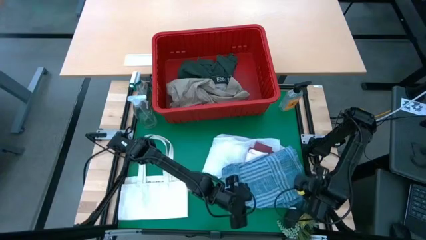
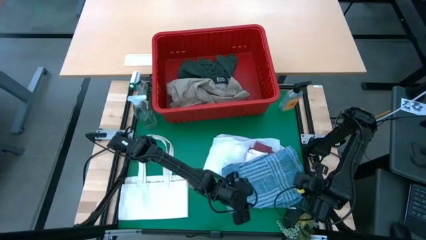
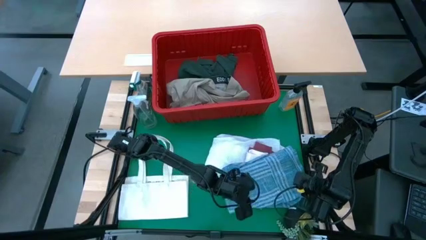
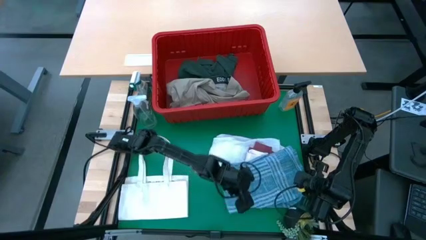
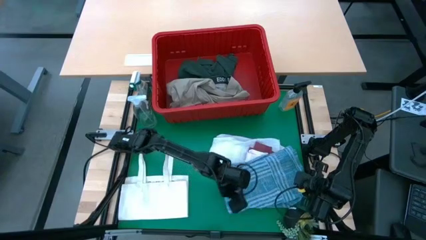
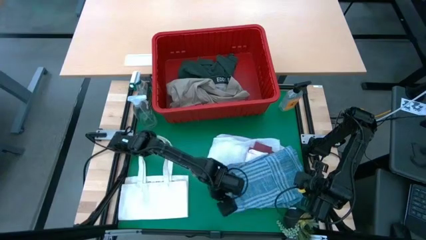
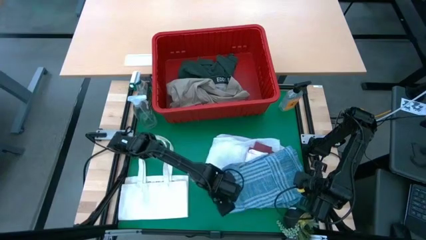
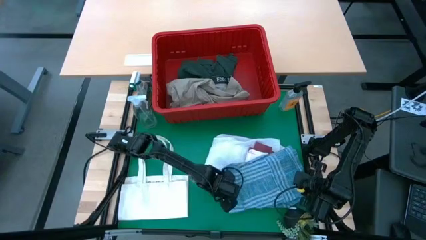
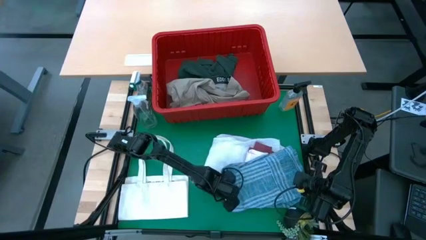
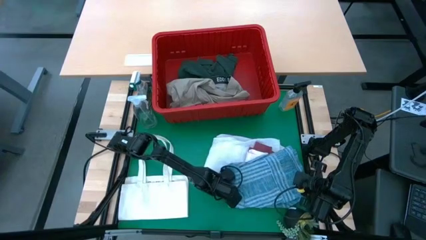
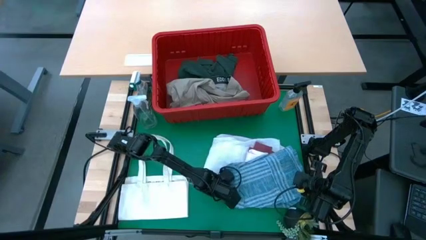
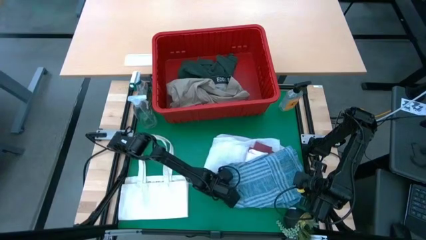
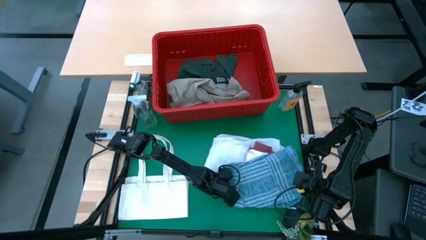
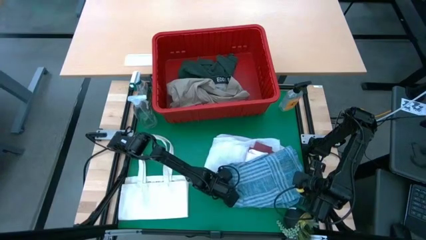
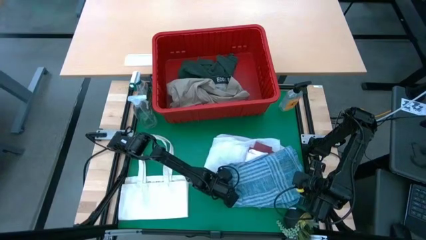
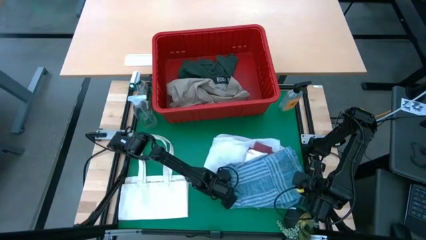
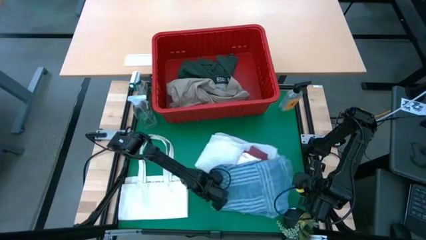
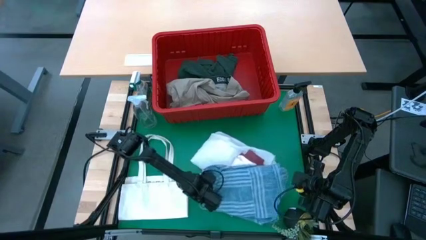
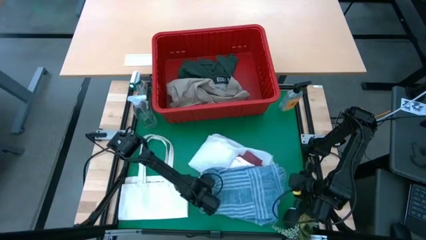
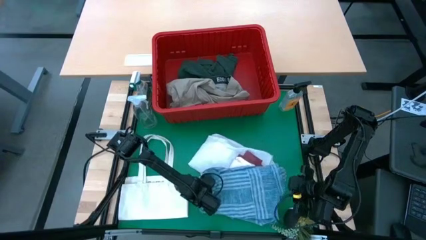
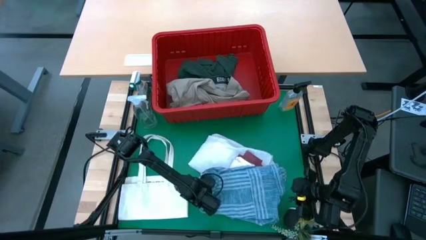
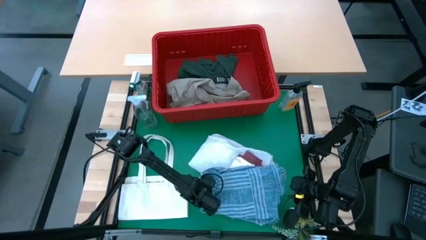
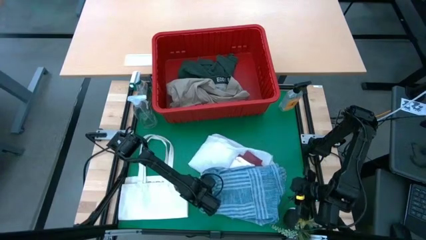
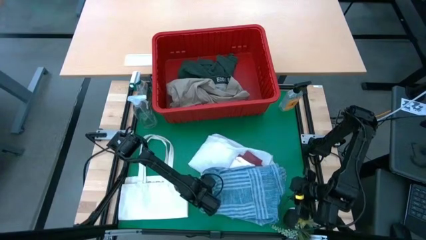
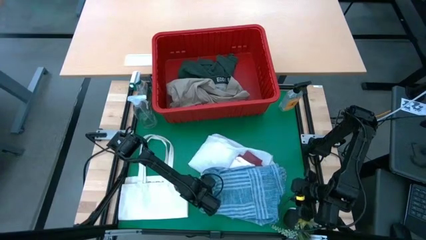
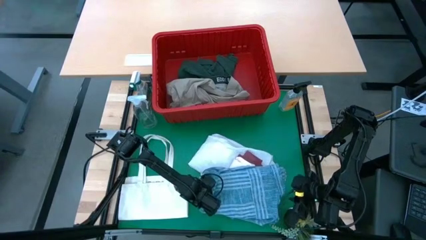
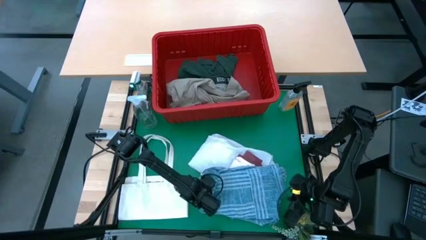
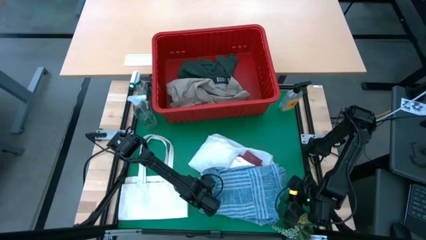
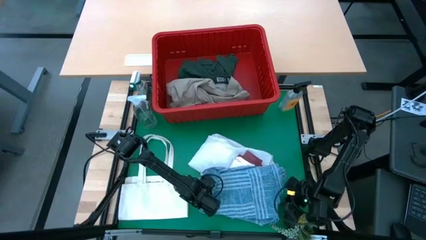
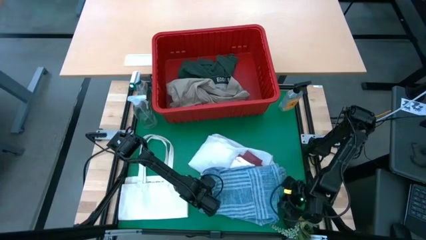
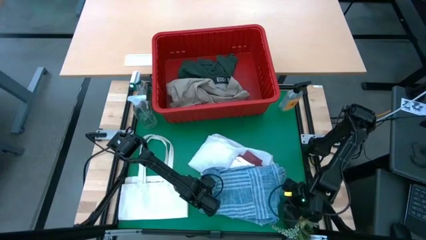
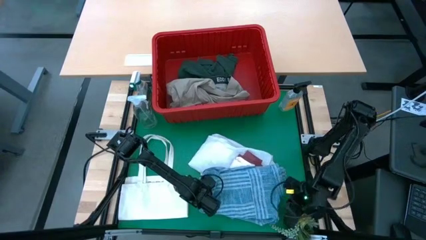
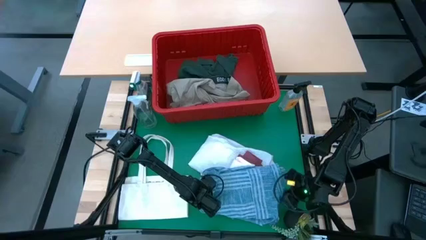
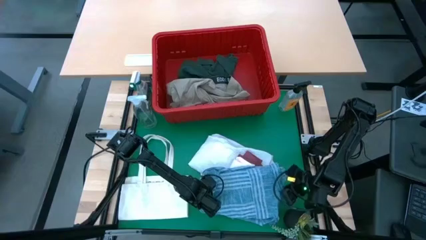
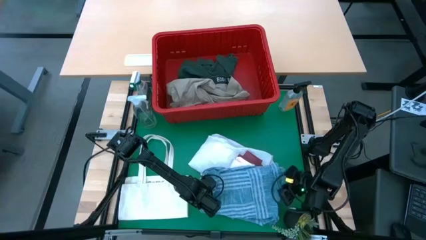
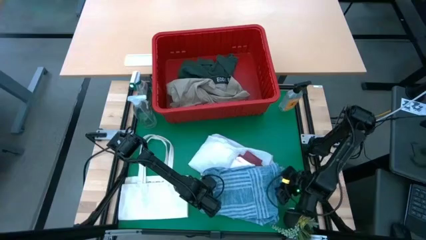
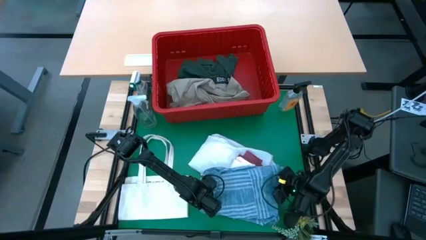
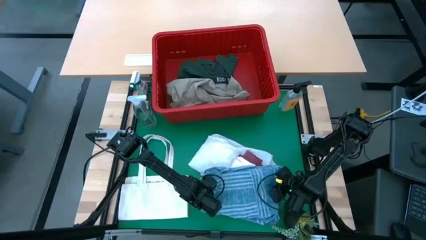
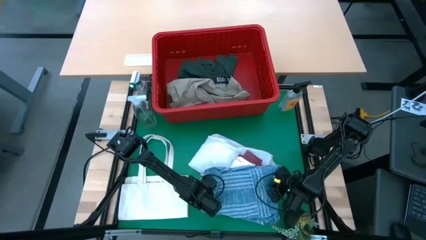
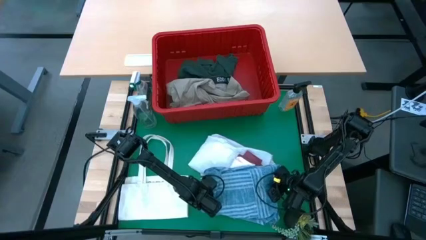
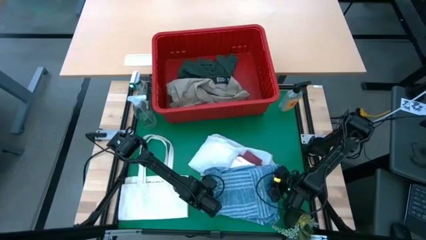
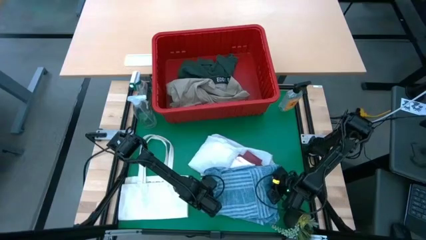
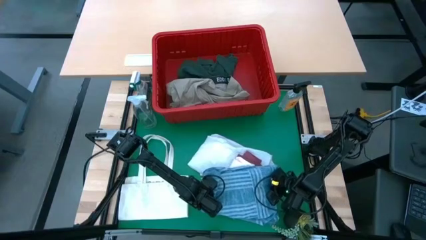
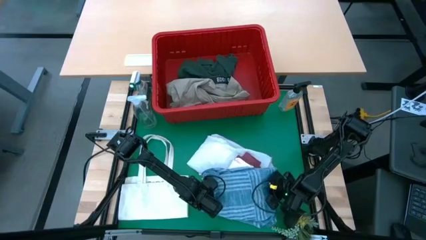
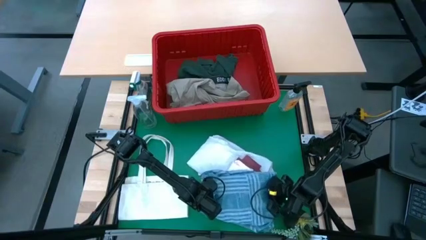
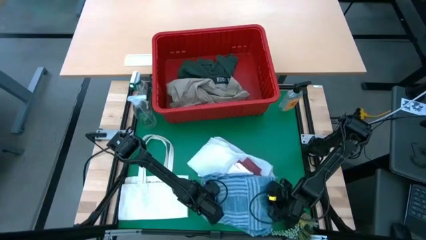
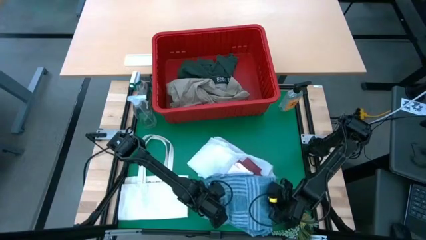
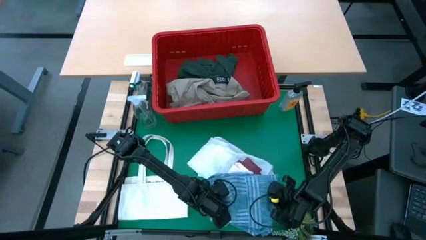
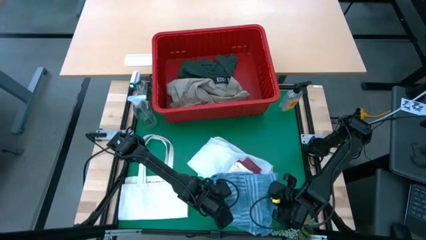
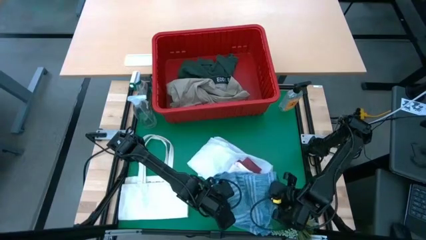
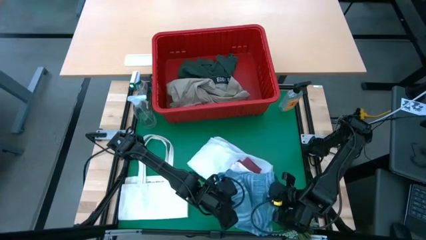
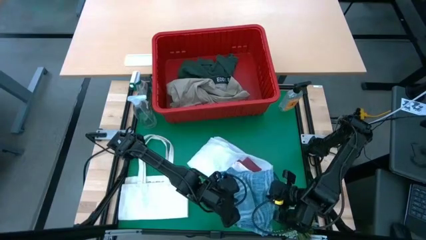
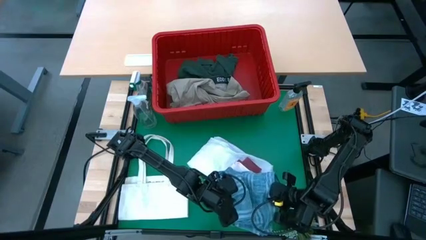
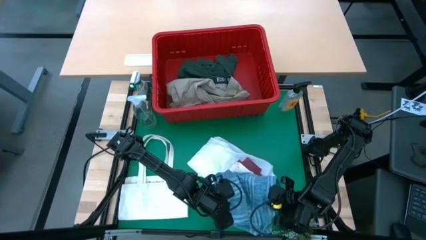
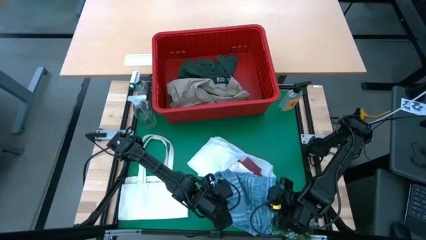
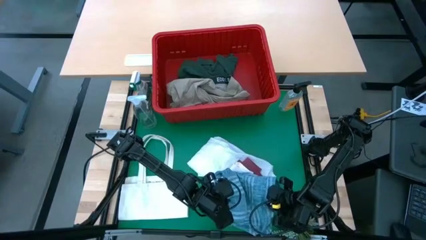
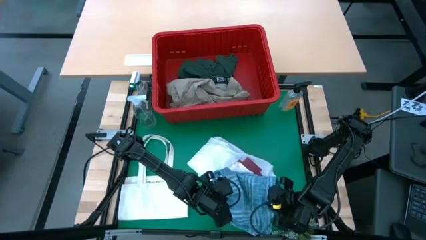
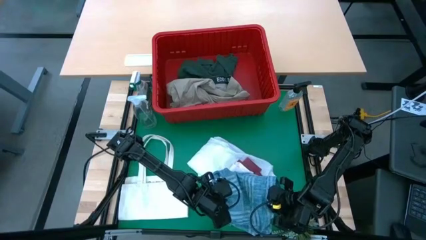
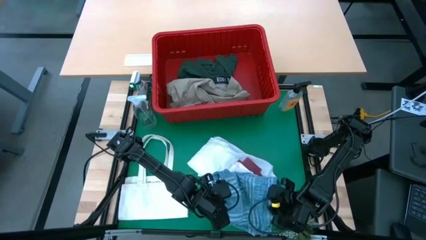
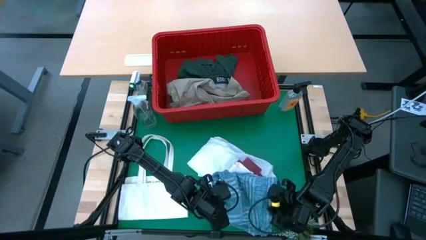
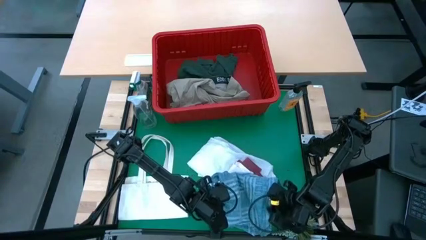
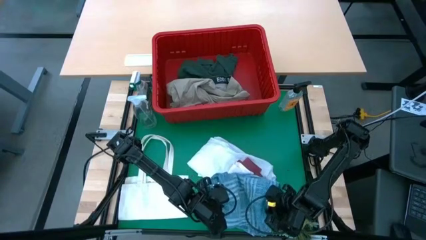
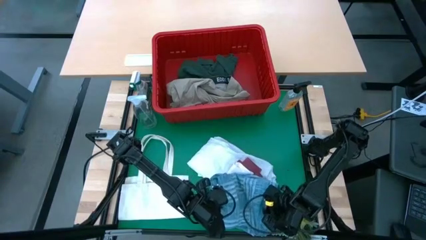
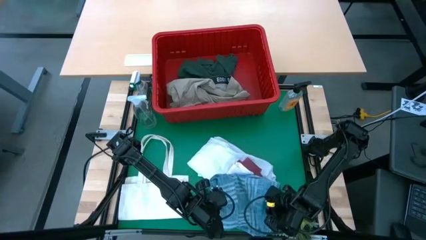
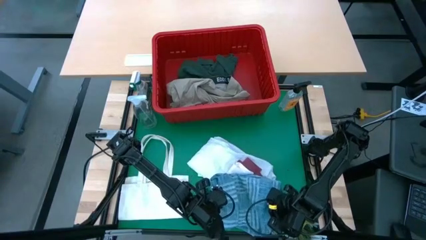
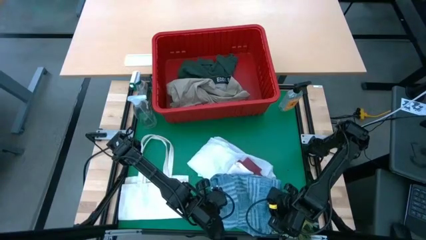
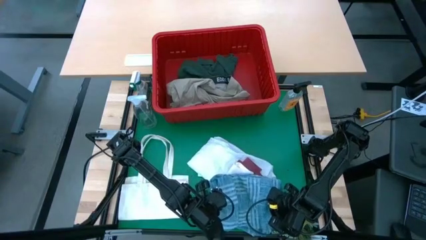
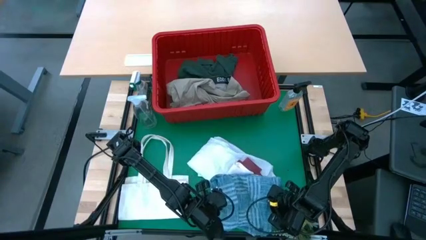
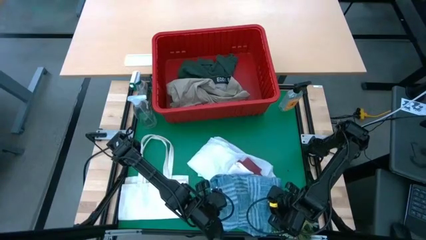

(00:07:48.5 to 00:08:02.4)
Task: Fold Laundry from Bin
Stack the blue checkered polo shirt on top of the folded white underwear
